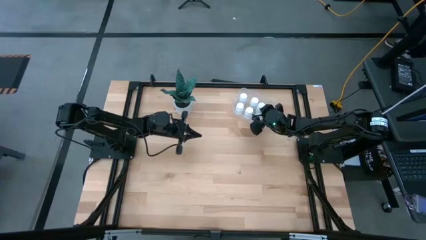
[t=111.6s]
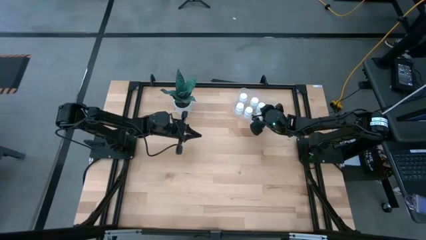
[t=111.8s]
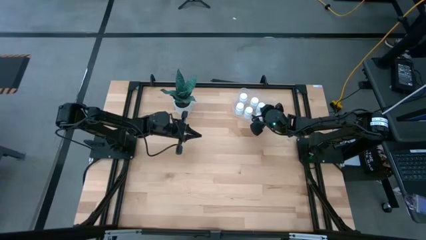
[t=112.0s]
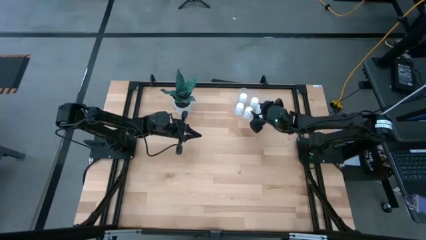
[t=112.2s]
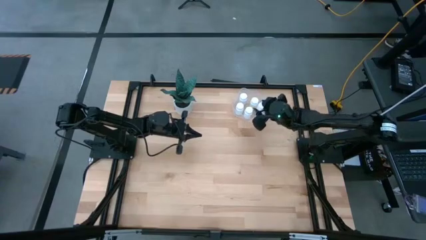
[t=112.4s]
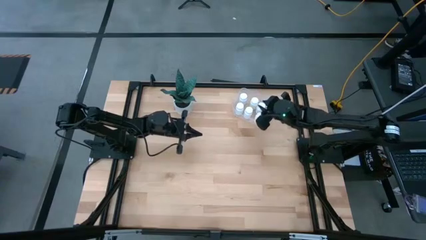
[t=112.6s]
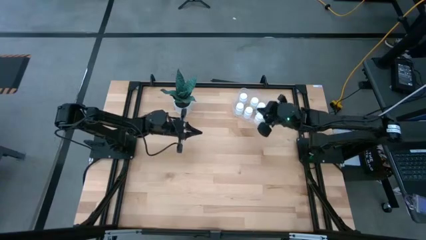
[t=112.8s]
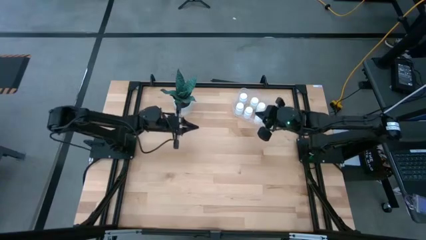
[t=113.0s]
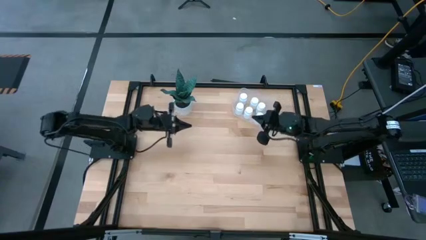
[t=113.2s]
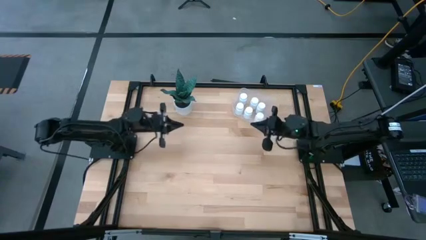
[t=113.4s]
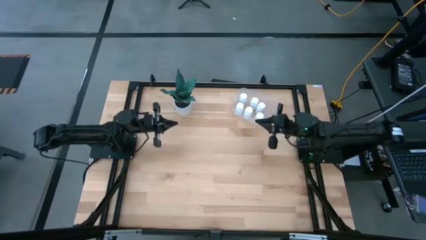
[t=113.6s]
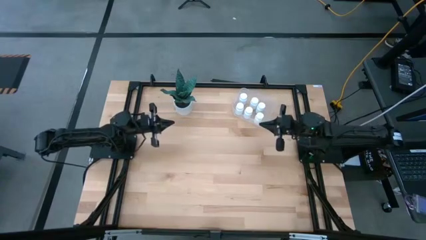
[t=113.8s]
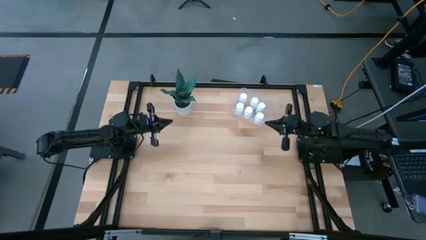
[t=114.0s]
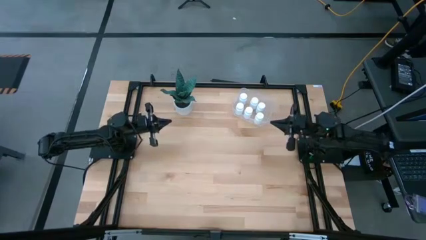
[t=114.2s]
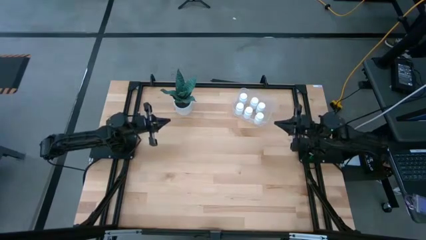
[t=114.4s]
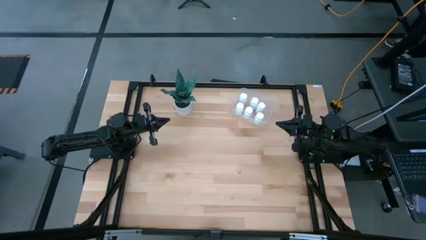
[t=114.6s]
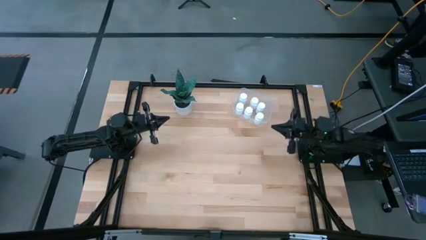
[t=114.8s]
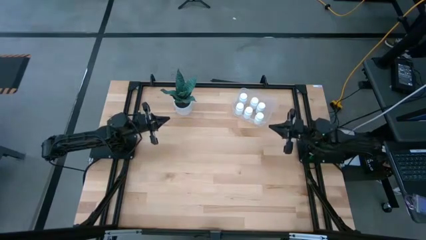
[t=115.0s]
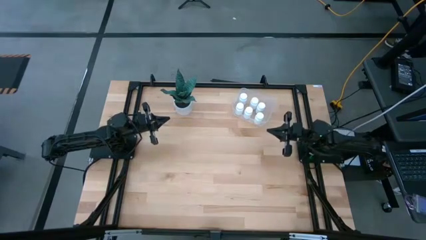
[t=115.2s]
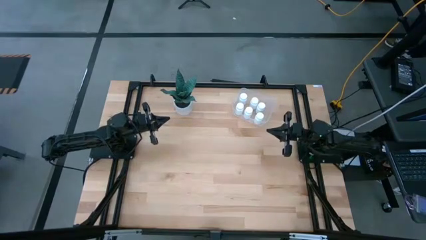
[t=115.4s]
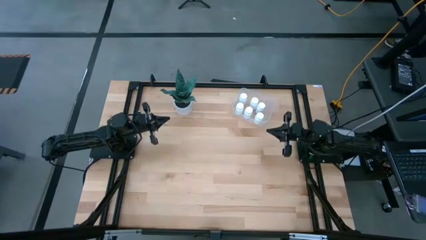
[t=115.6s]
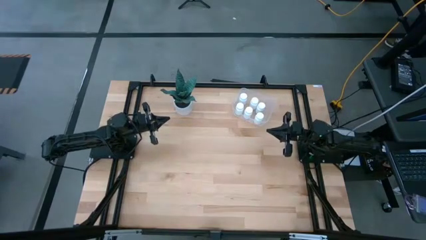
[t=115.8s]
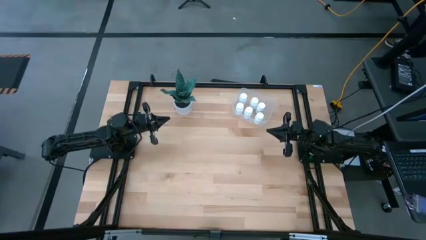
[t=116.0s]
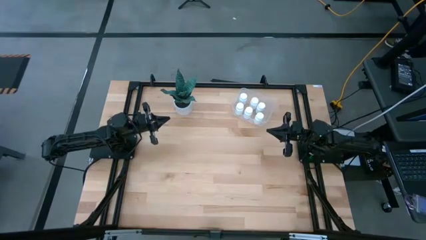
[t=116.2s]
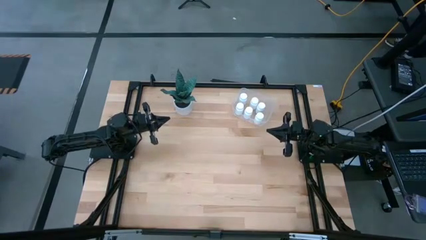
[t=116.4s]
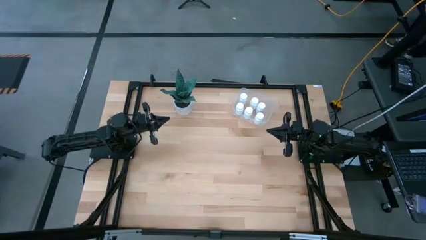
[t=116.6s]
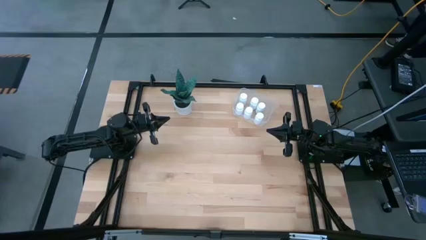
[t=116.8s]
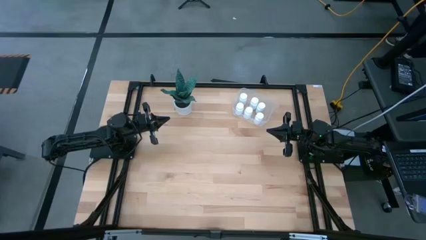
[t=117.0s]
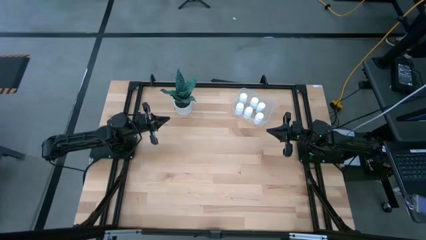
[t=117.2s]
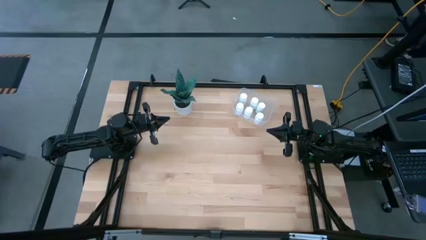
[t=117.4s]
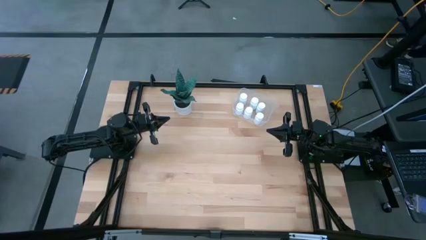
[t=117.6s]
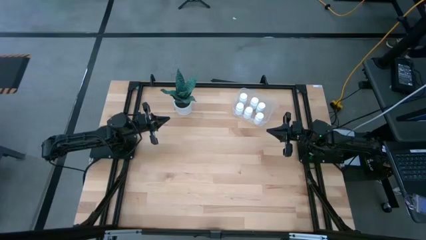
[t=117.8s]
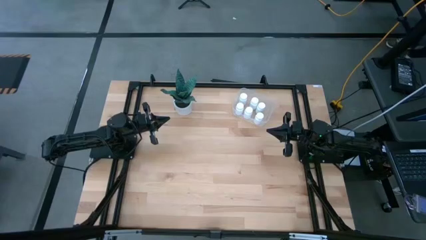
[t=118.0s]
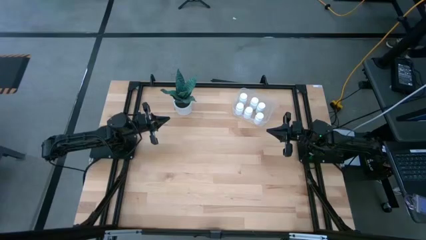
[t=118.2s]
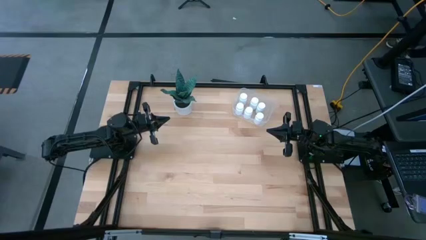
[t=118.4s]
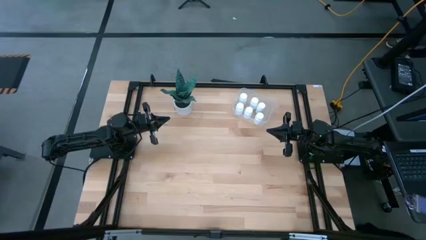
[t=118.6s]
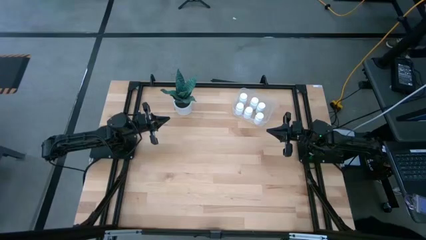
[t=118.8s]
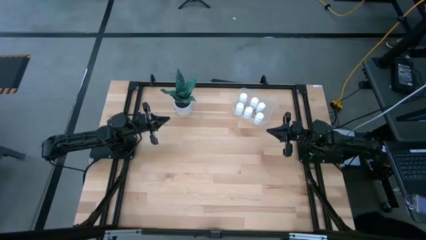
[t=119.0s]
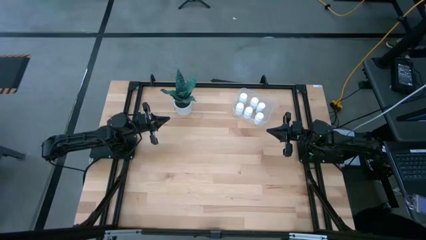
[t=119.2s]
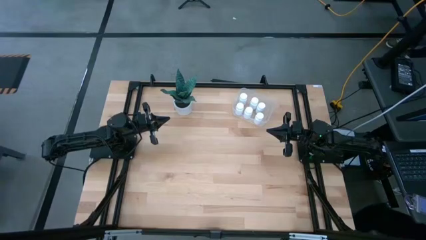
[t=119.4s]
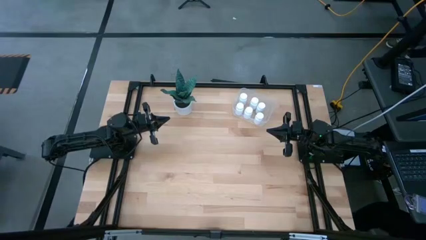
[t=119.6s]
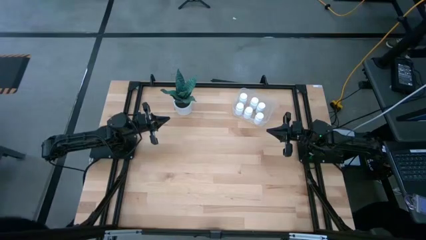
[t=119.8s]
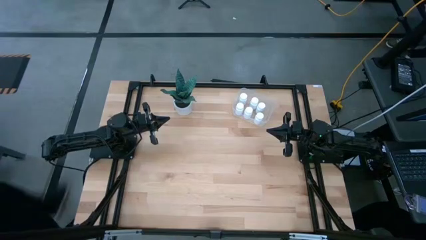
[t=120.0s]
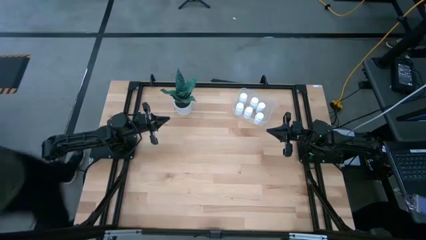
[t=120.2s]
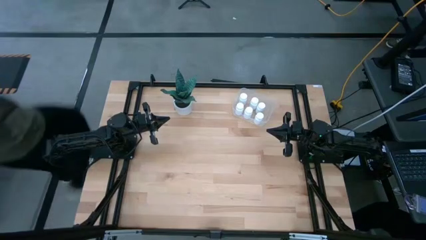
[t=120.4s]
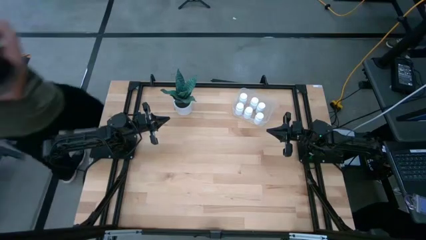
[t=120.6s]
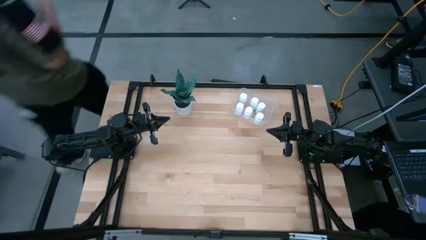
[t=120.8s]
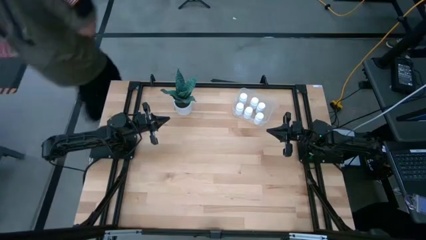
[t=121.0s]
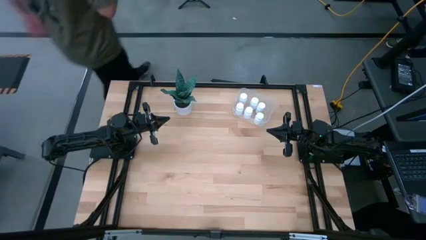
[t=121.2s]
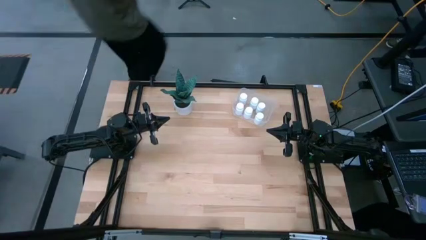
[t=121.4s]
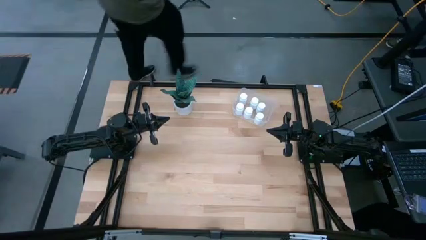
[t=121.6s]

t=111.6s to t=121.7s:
Task: Pick and place pill bottles into a basket
Return to Home Position
